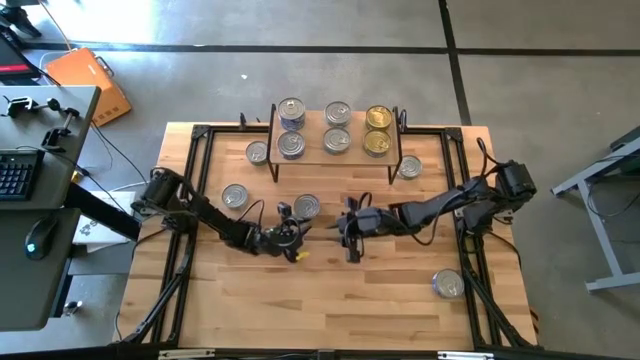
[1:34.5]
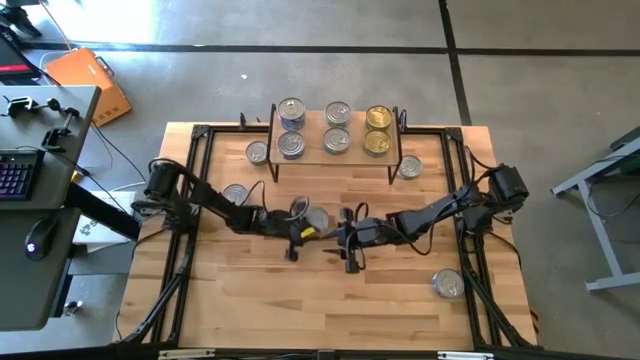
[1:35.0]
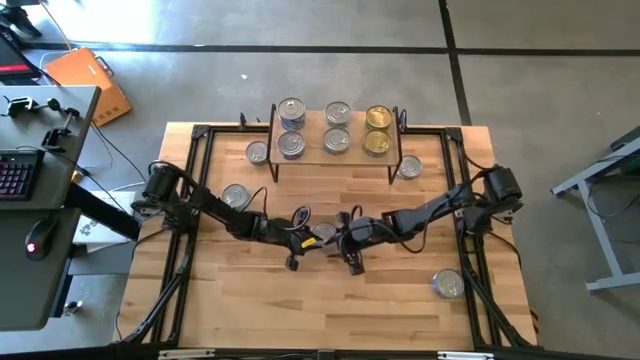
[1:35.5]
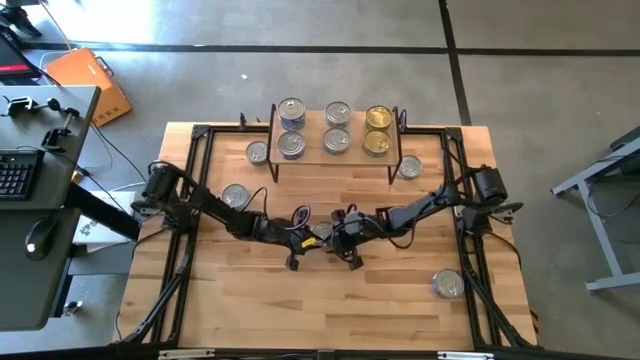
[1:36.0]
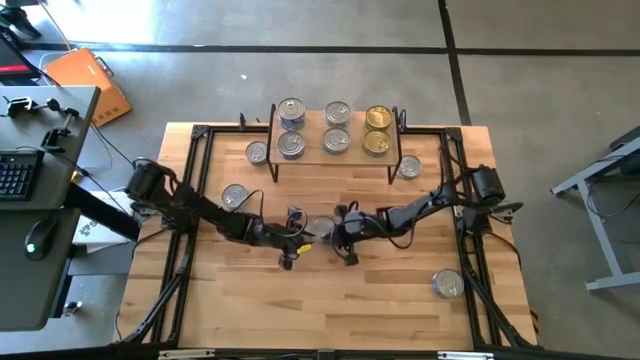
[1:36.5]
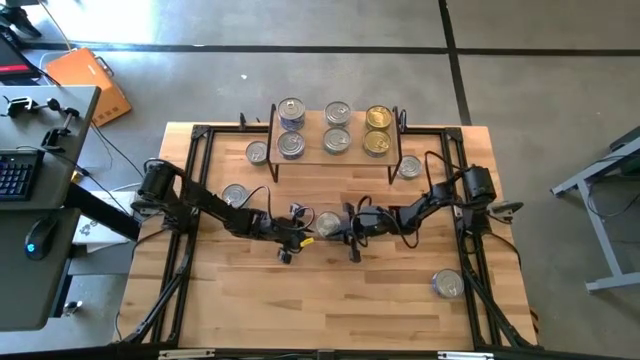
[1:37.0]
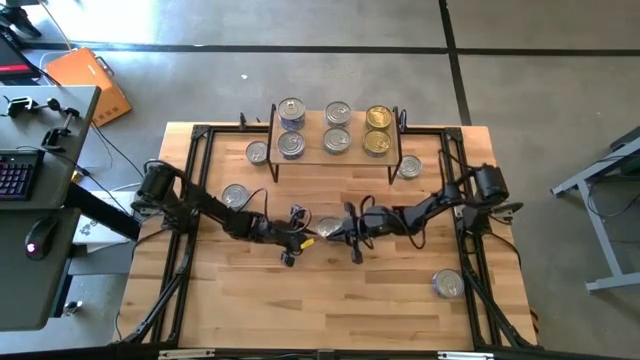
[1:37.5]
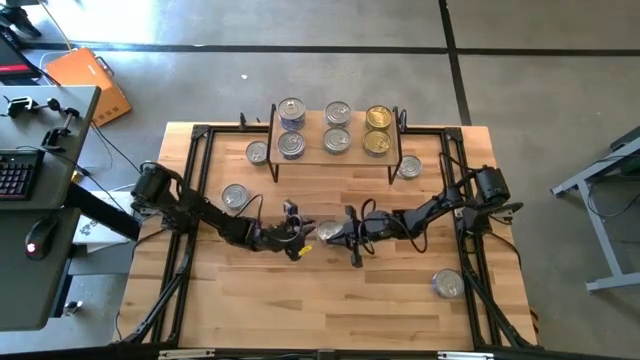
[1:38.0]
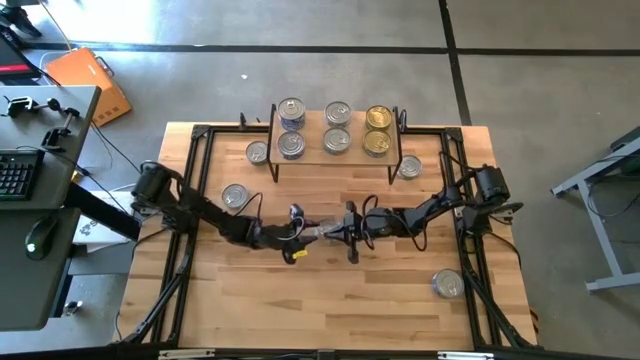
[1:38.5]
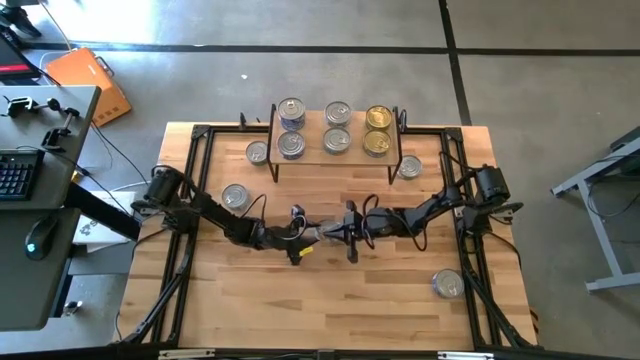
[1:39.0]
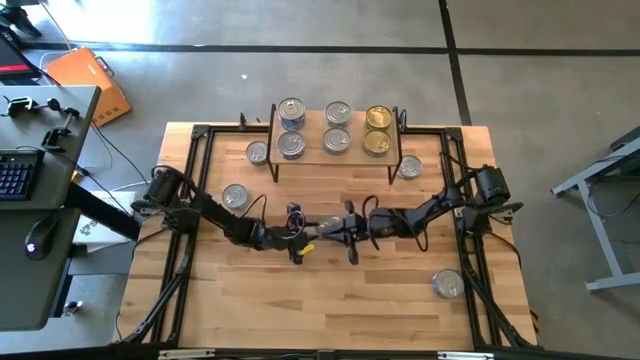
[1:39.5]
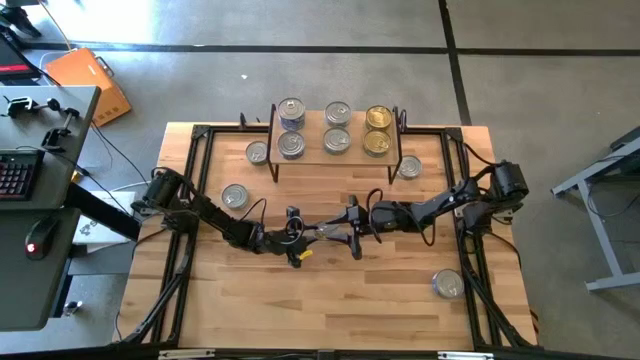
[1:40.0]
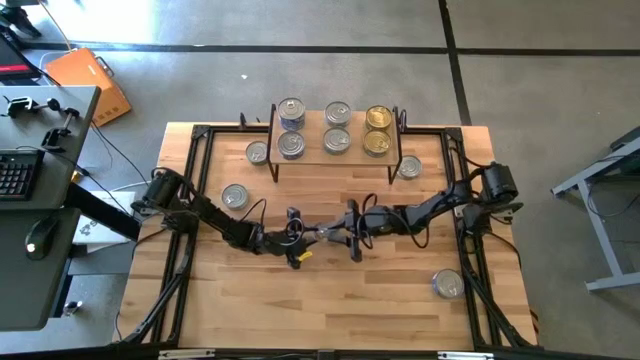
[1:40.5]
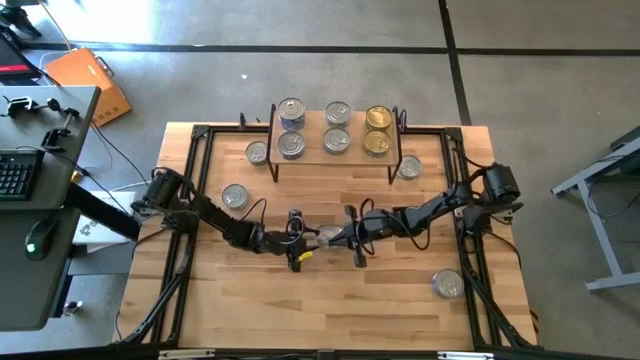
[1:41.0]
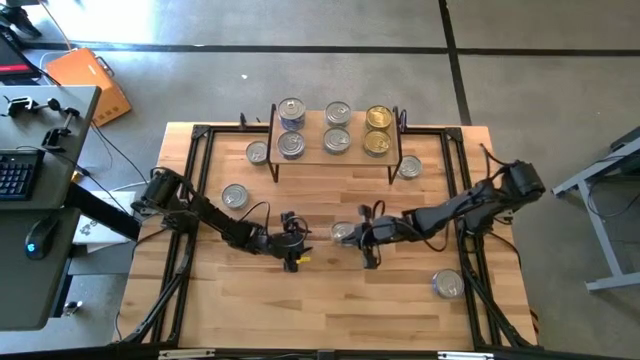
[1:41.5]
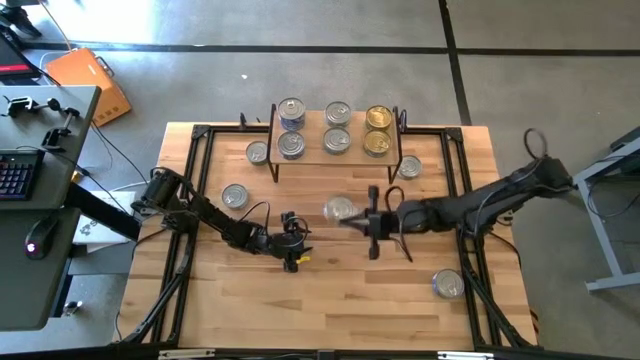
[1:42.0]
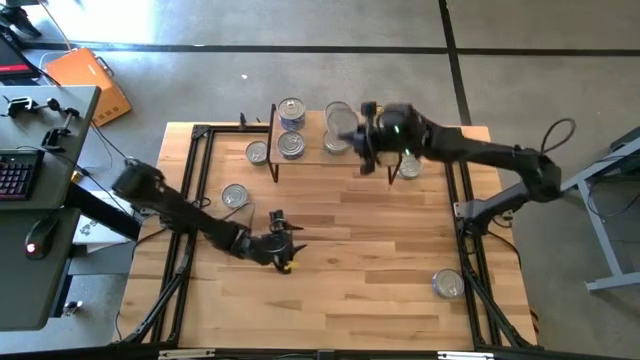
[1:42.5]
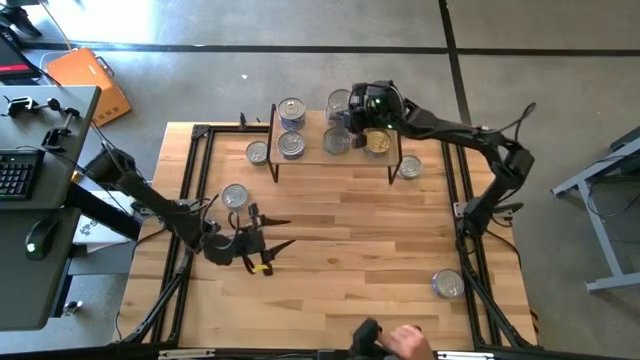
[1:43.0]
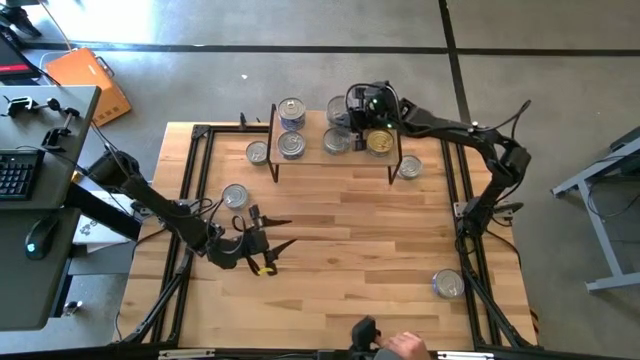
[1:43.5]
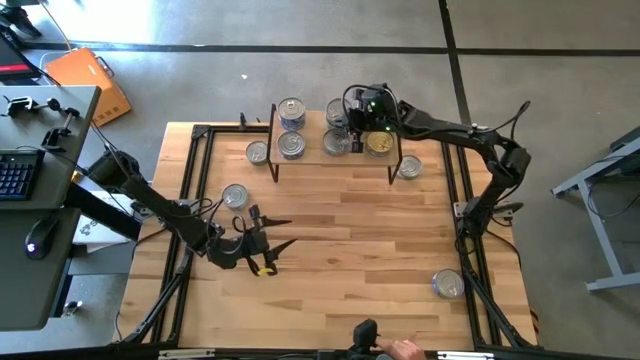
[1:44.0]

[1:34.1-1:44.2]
Task: Stack canned seafood by type on shelf
Stack the yellow-blue tuna can on top of the other yellow-blue tuna can on the shelf

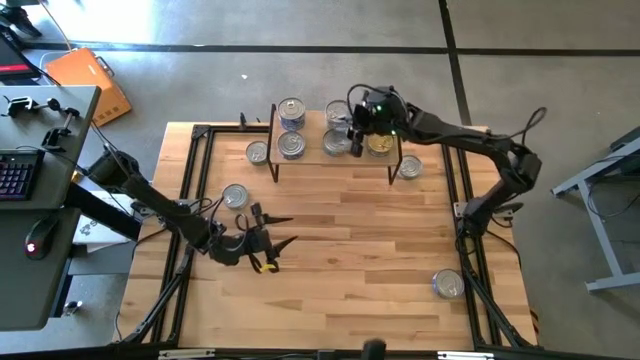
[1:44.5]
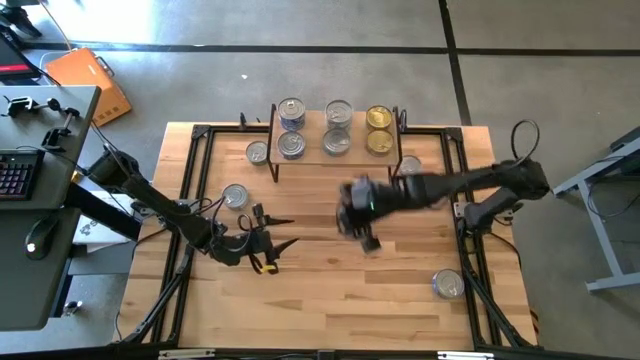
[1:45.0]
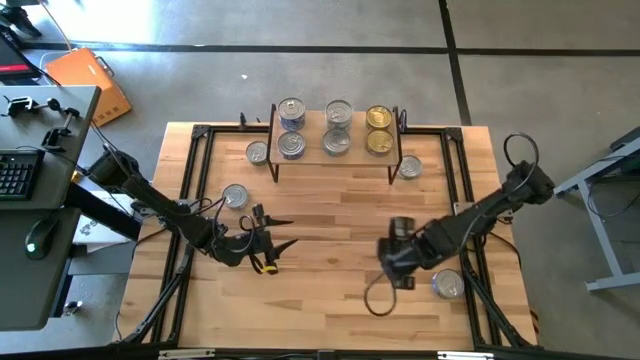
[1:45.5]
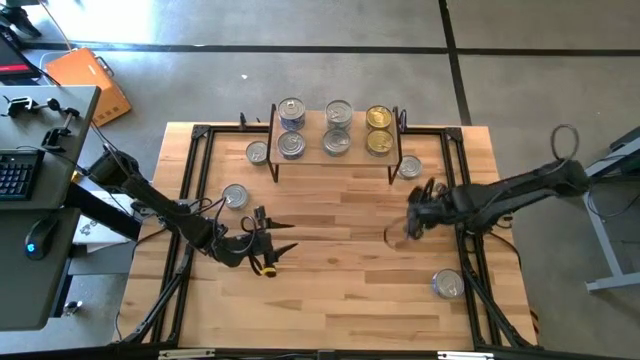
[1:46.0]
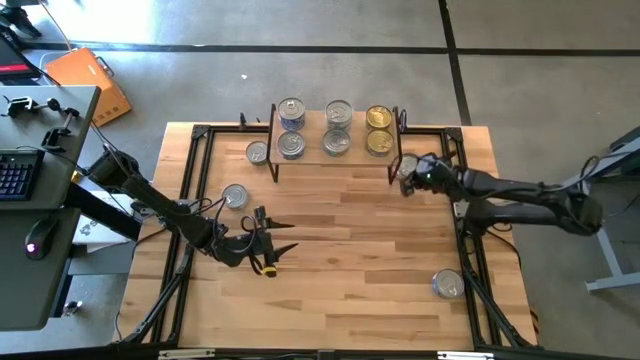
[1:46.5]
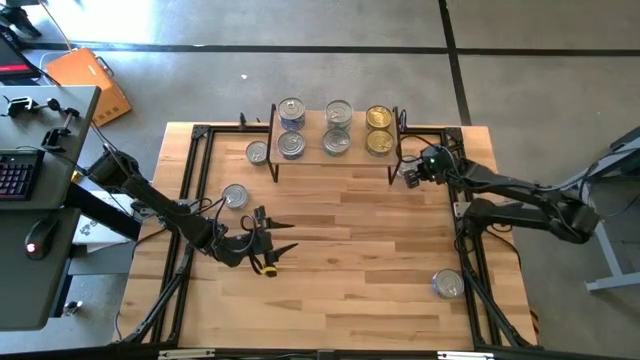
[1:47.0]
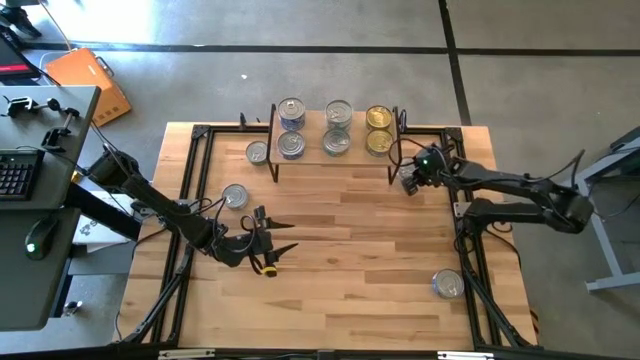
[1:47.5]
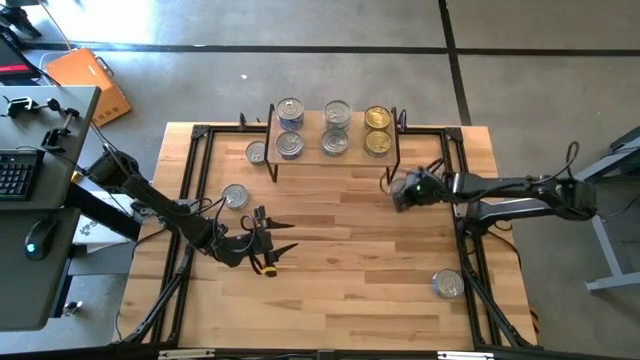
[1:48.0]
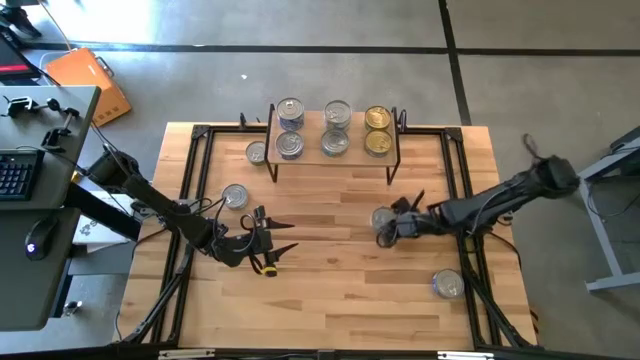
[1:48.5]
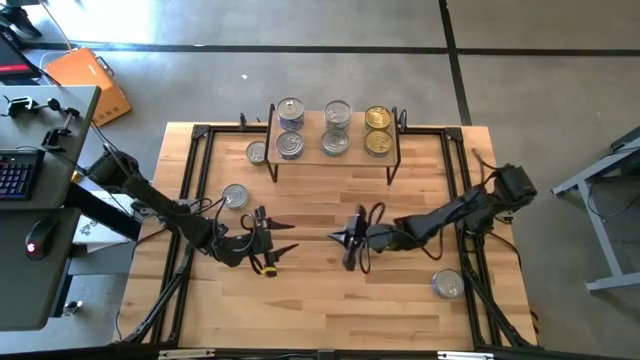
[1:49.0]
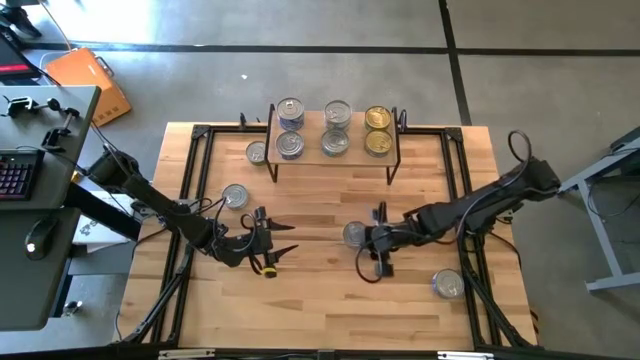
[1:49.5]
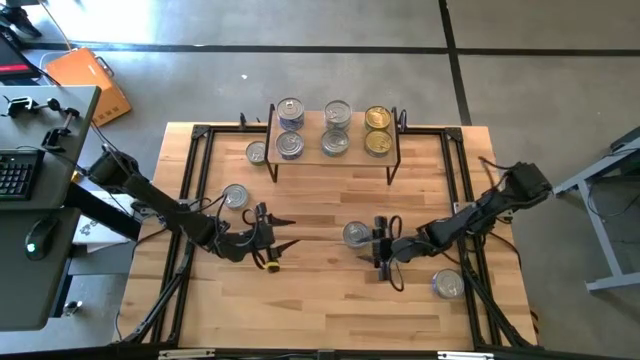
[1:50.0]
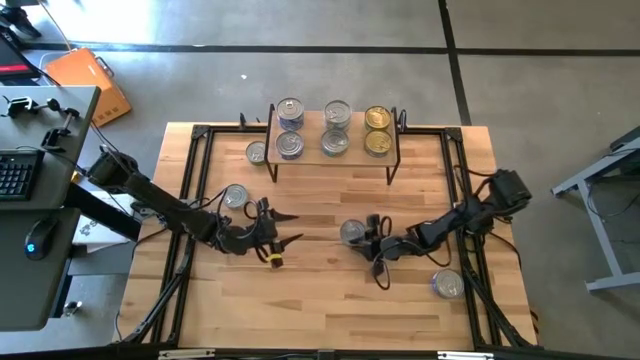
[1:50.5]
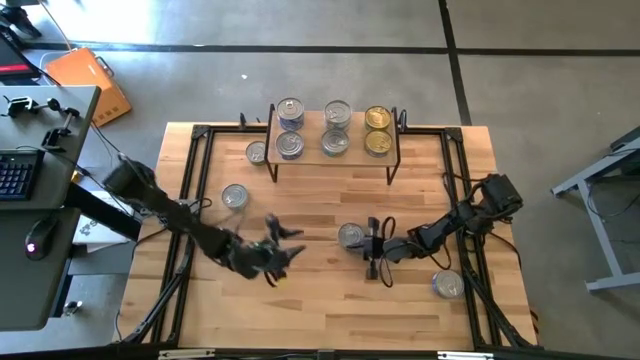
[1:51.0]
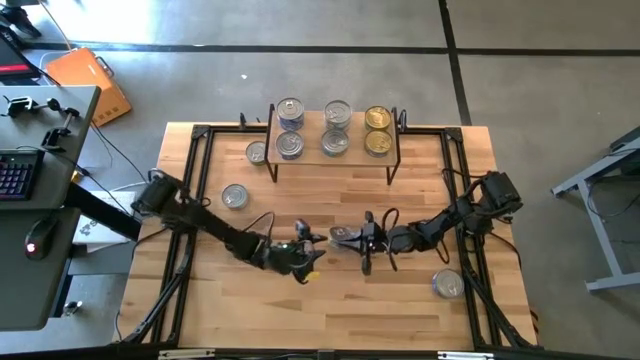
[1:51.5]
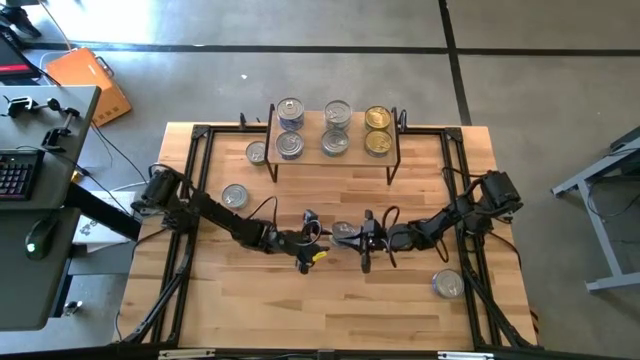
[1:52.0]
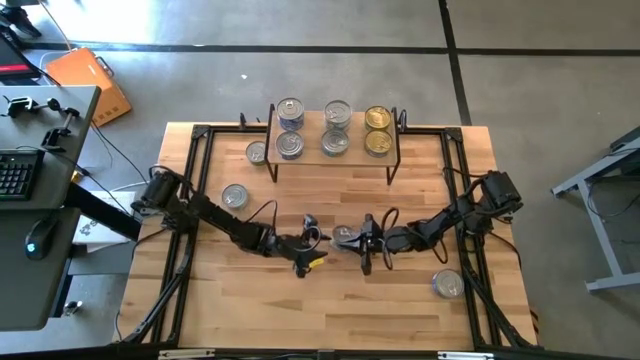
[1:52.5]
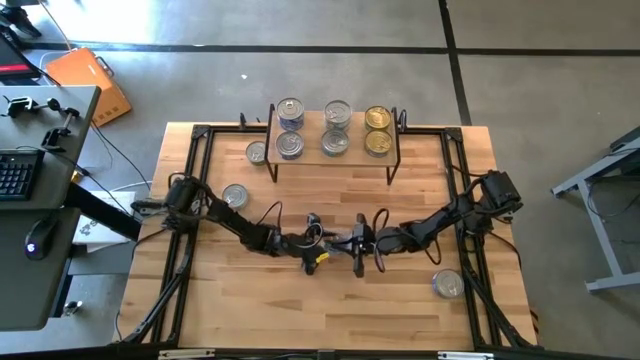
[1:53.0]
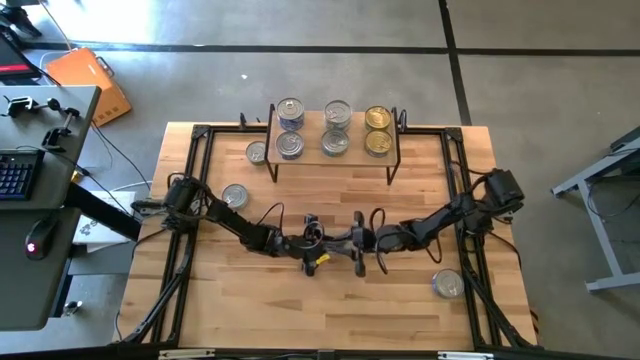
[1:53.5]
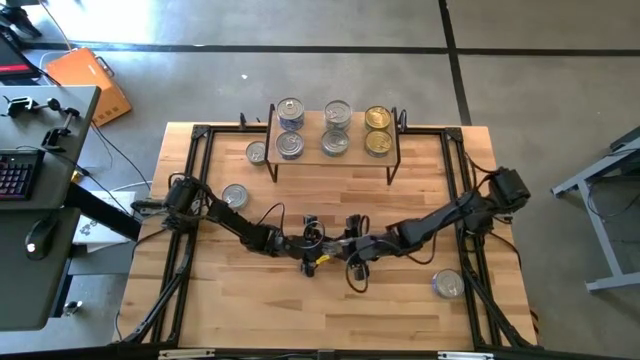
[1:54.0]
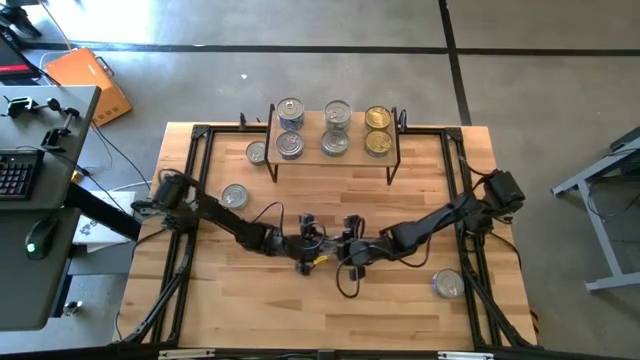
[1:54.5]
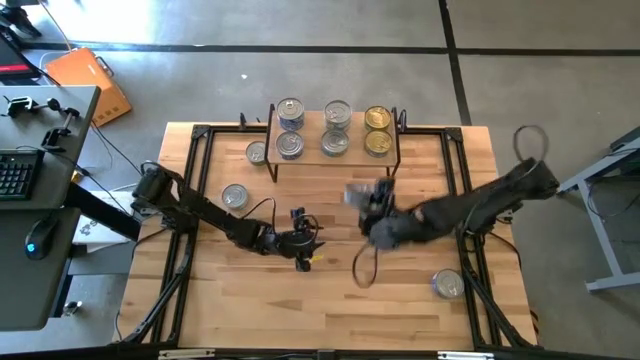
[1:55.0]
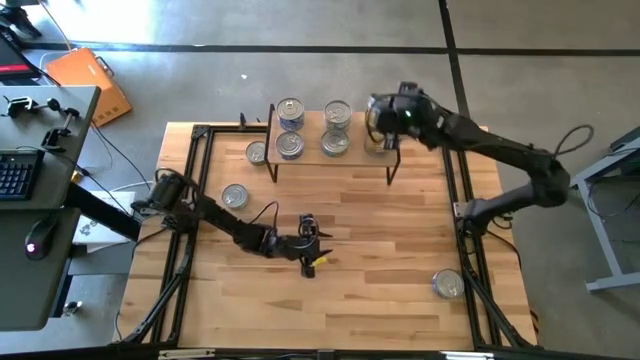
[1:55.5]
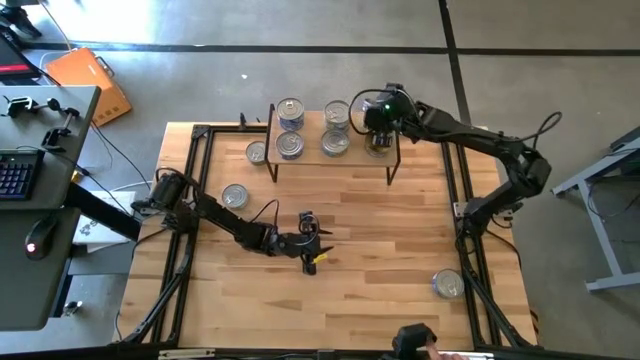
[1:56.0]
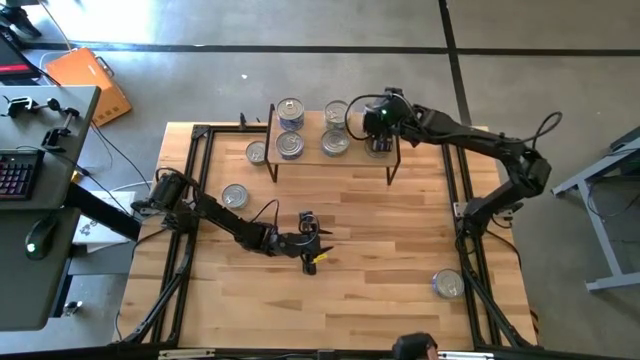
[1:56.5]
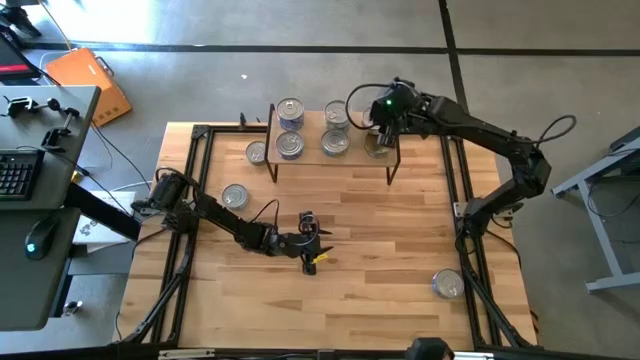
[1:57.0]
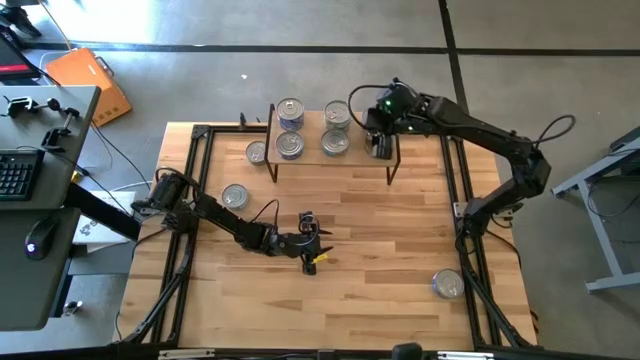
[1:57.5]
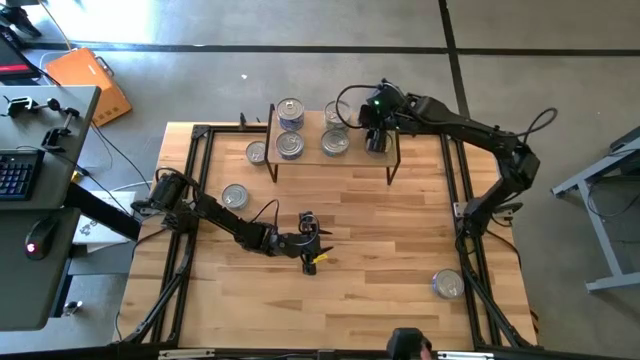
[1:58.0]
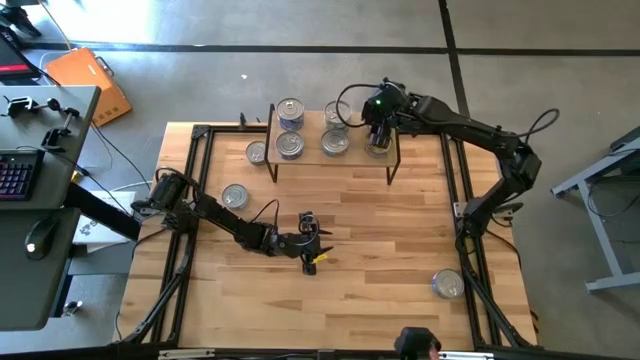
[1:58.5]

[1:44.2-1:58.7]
Stack the green tuna can on top of the other green tuna can on the shelf
